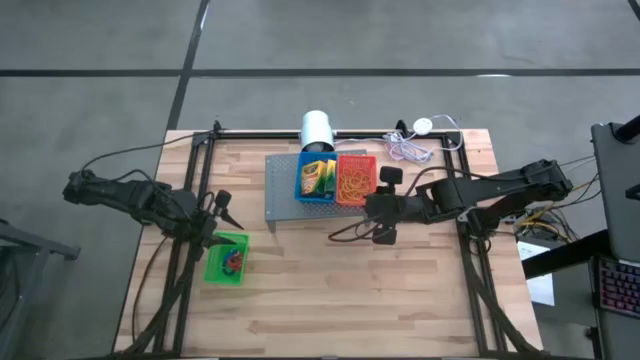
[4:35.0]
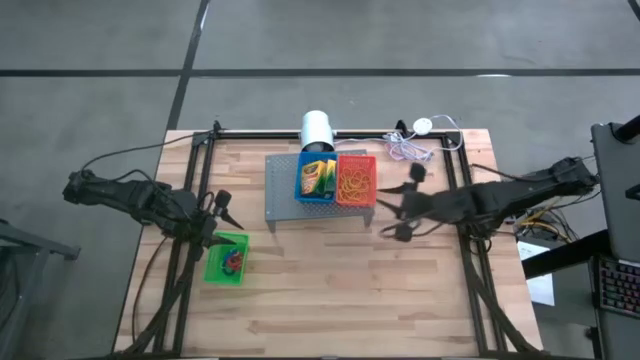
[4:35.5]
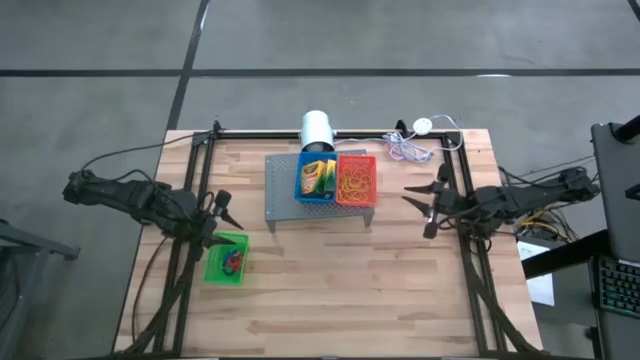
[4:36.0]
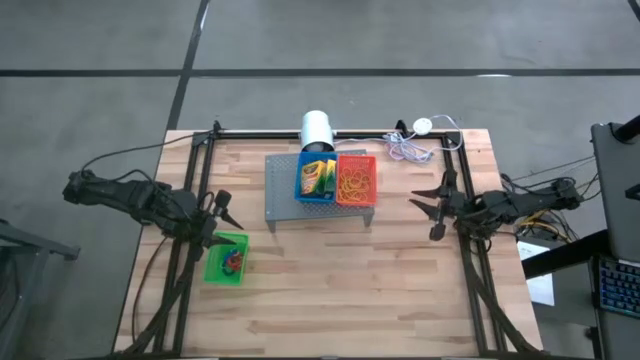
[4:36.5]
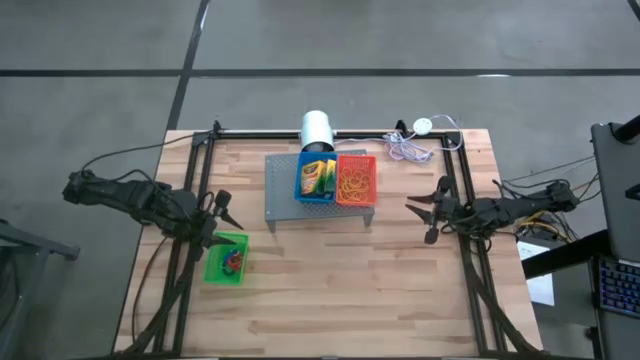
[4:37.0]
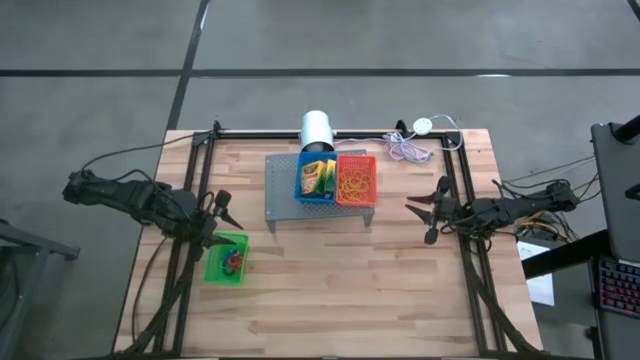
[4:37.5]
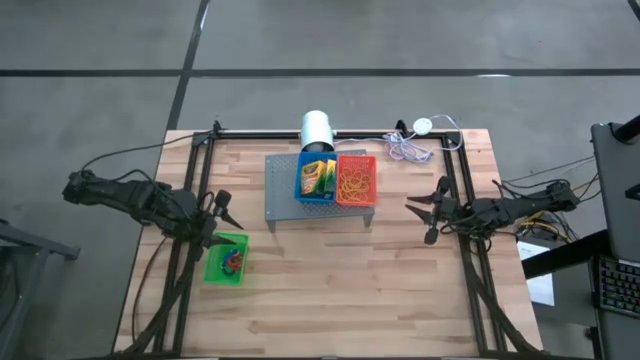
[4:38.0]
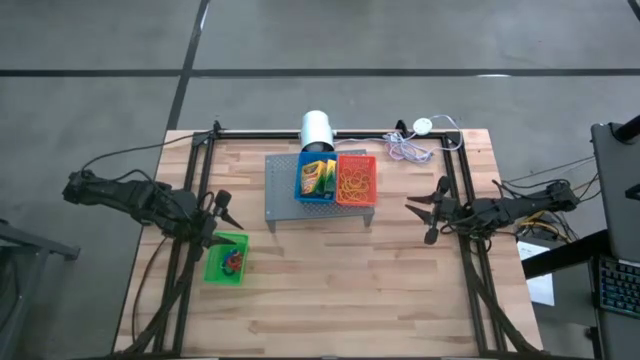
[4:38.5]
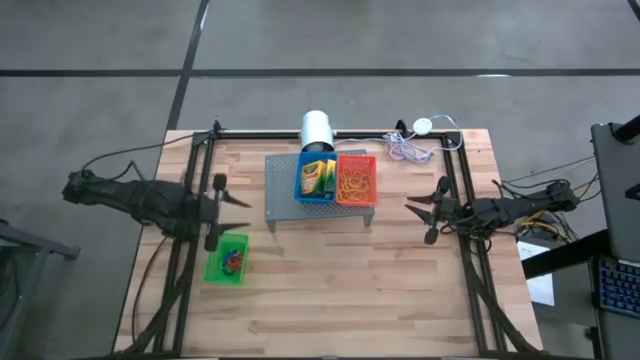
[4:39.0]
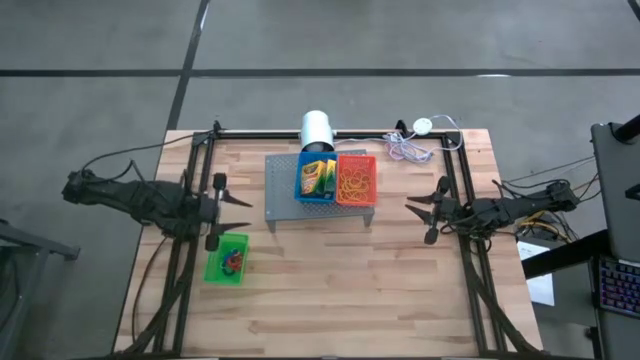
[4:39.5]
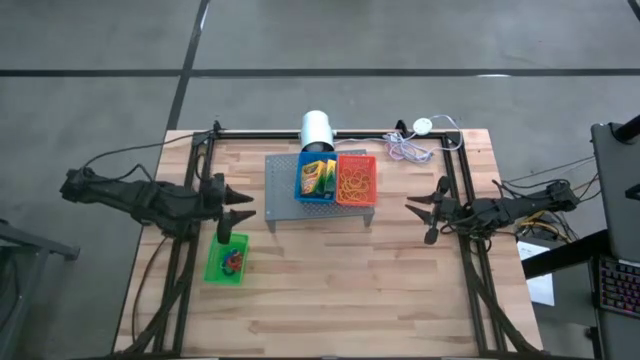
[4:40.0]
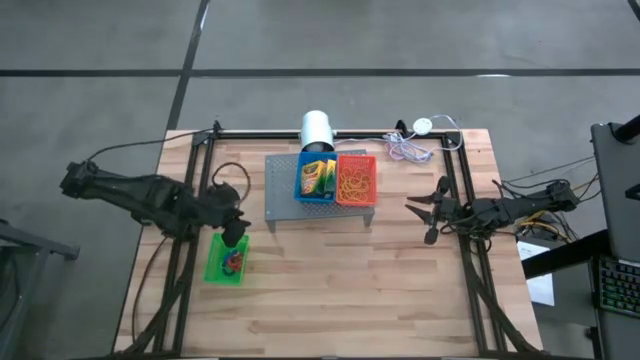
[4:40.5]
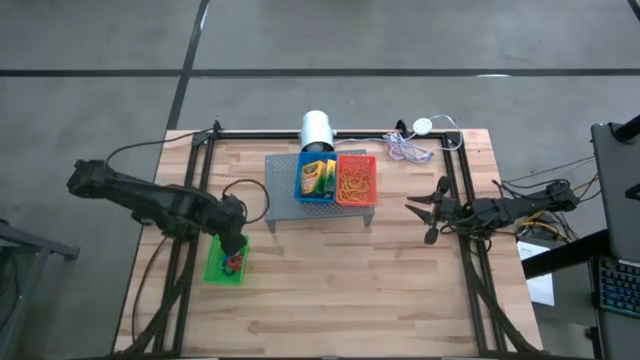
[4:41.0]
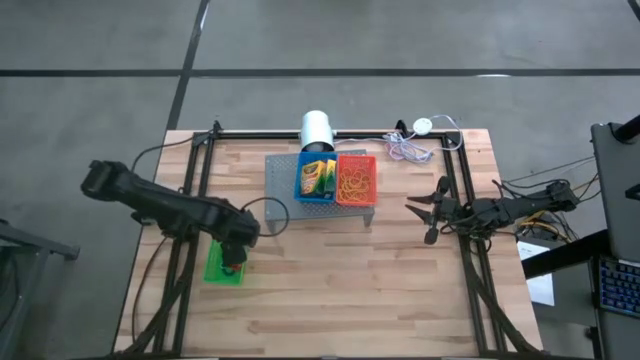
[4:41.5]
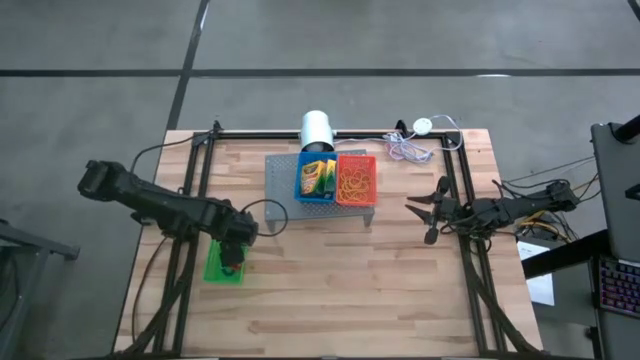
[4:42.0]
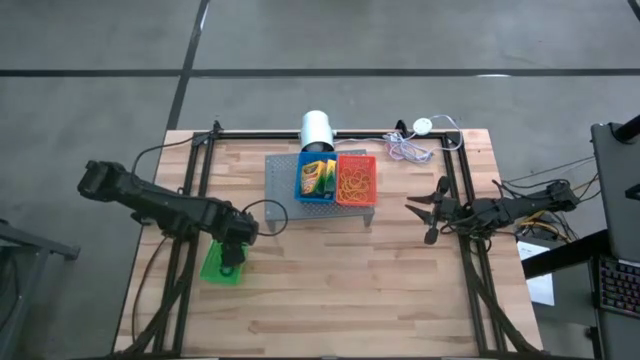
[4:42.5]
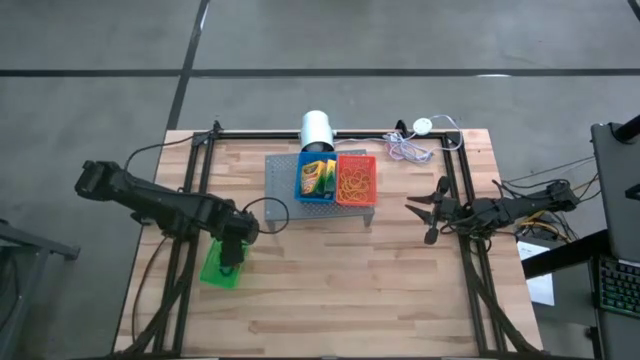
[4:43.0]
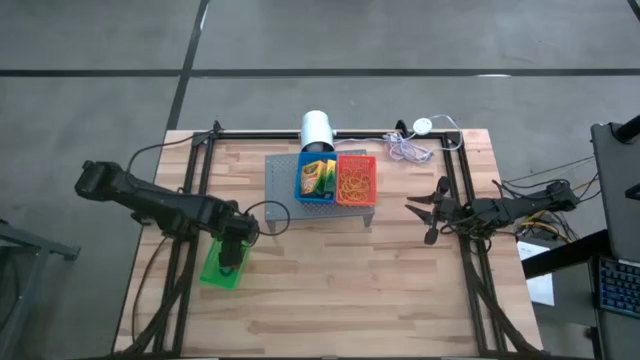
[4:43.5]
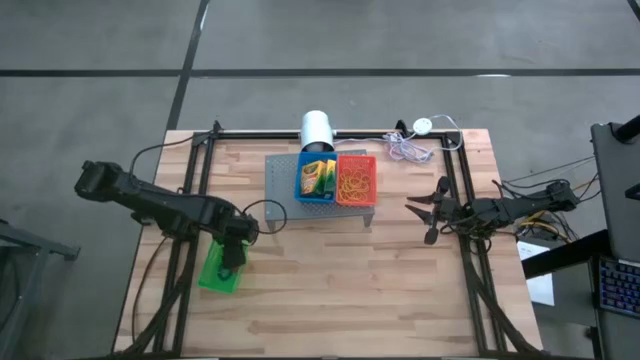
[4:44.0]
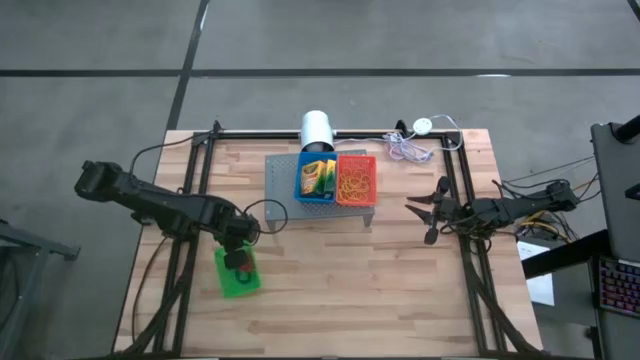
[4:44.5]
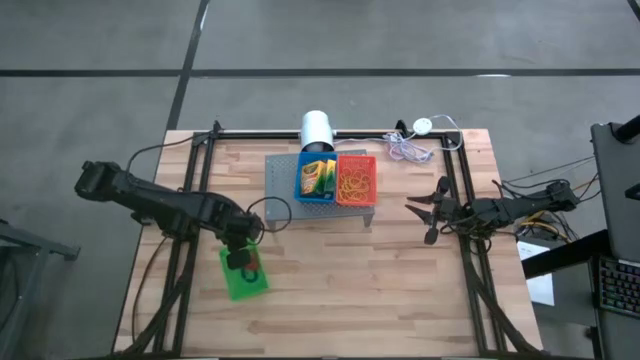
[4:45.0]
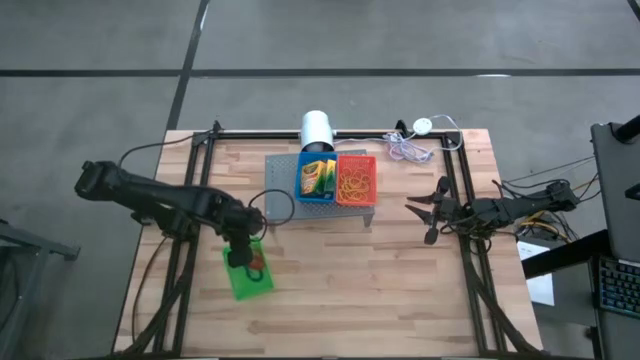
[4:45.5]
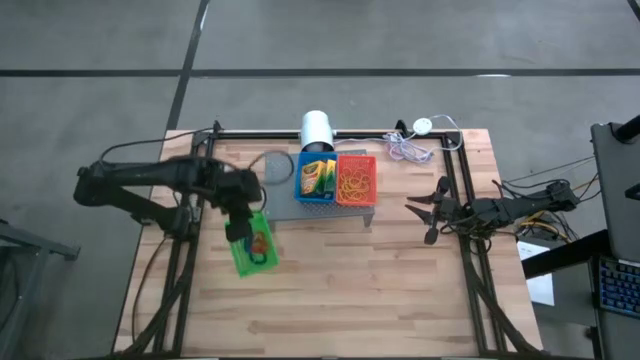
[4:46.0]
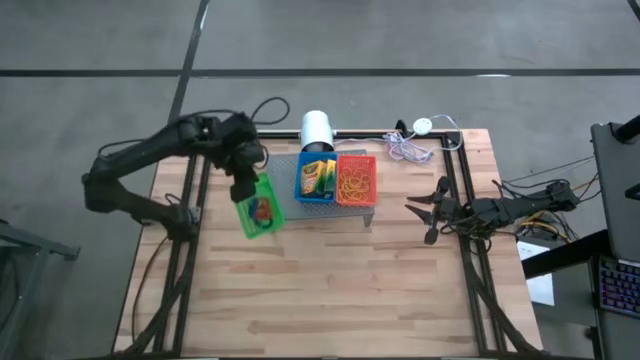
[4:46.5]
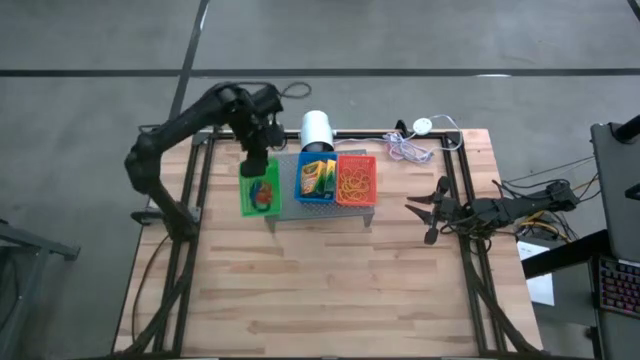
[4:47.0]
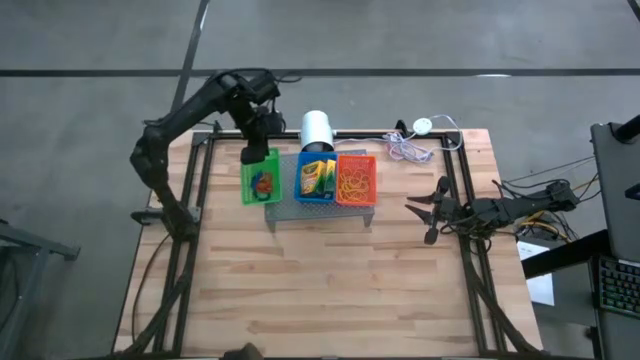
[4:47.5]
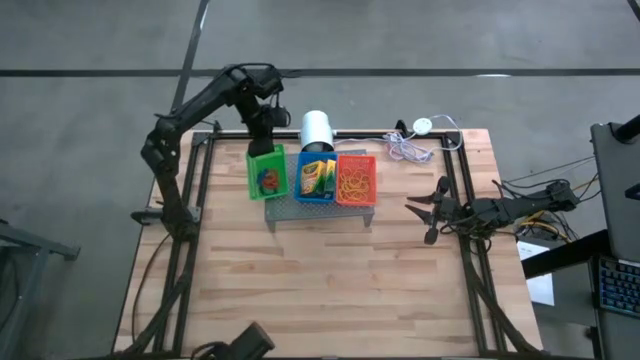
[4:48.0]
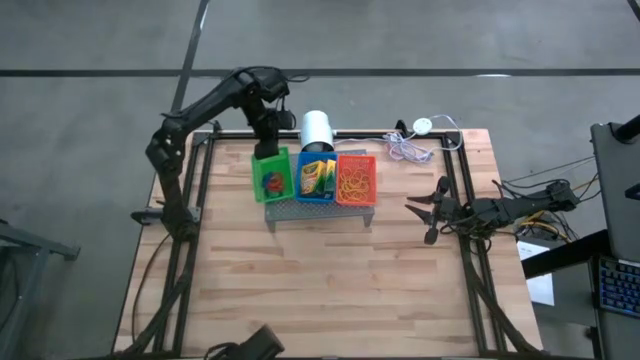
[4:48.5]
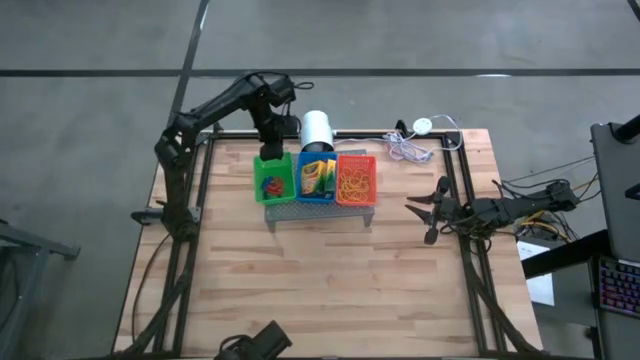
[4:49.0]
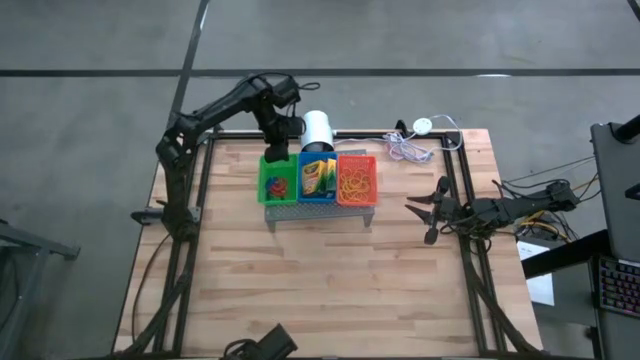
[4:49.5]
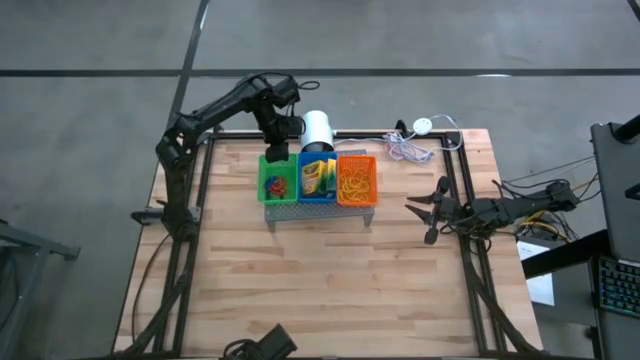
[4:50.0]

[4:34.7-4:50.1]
Task: Pick & Place Office Desk Supplies
Put the colored spring keychains into the green bin on the shelf

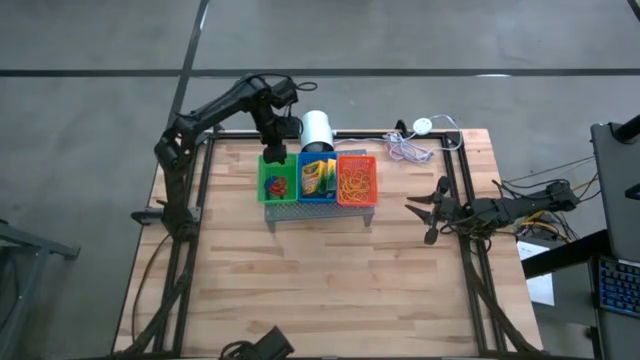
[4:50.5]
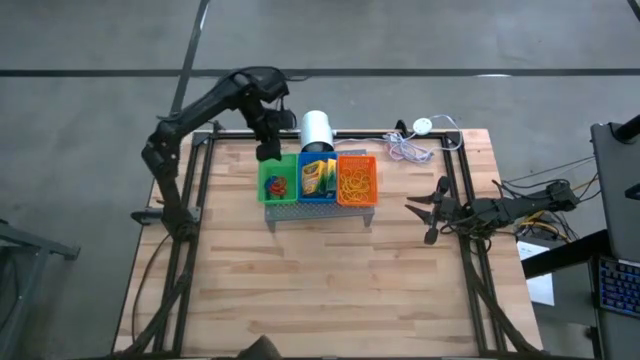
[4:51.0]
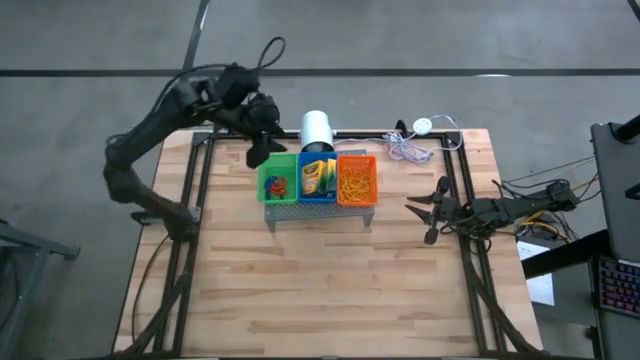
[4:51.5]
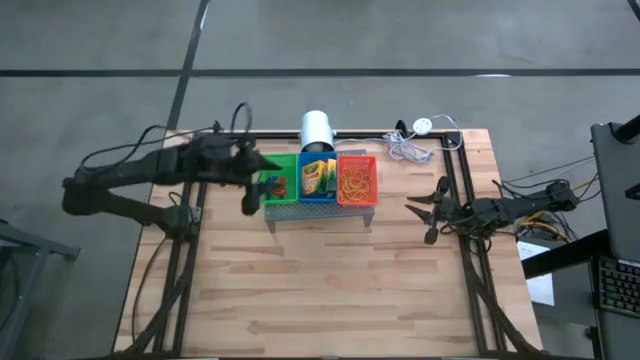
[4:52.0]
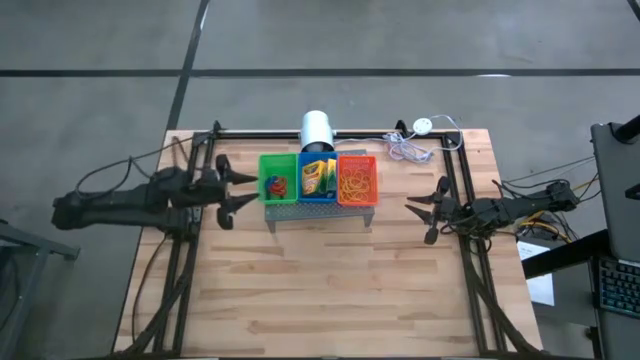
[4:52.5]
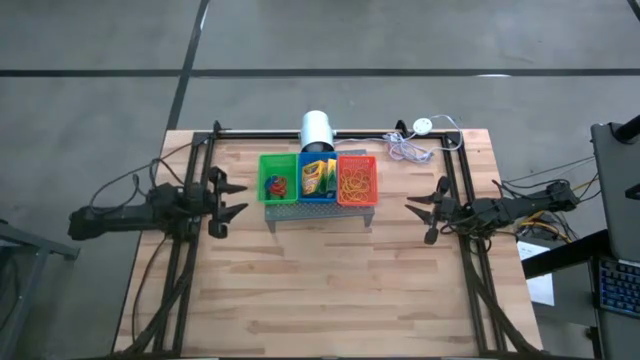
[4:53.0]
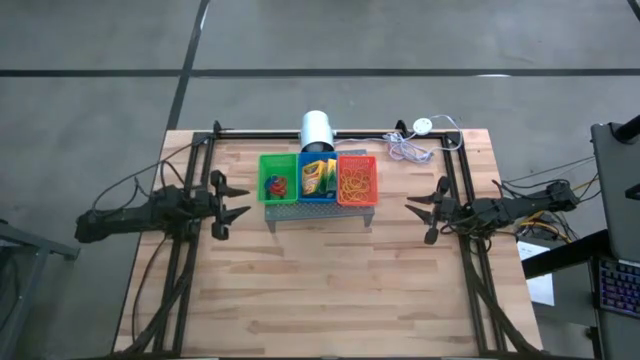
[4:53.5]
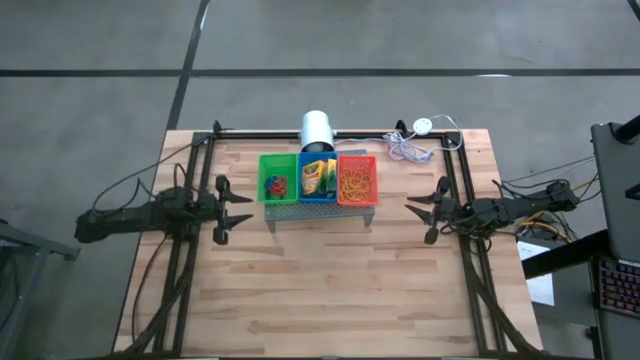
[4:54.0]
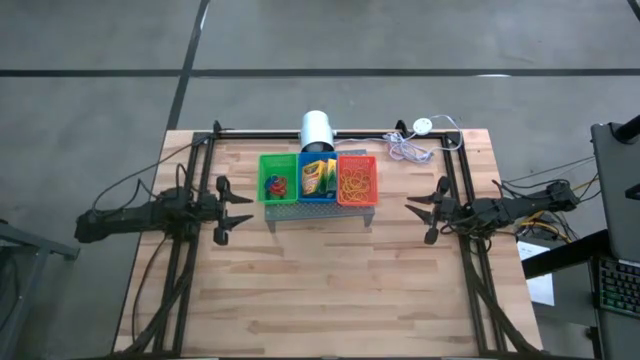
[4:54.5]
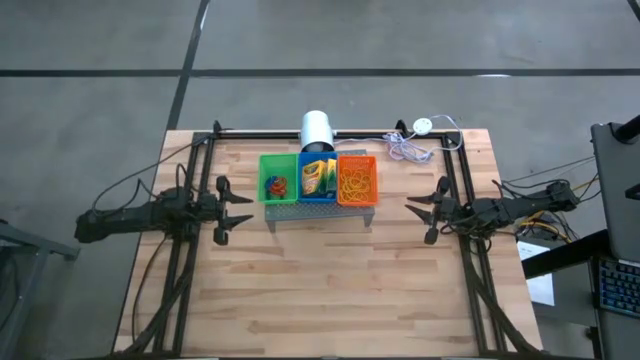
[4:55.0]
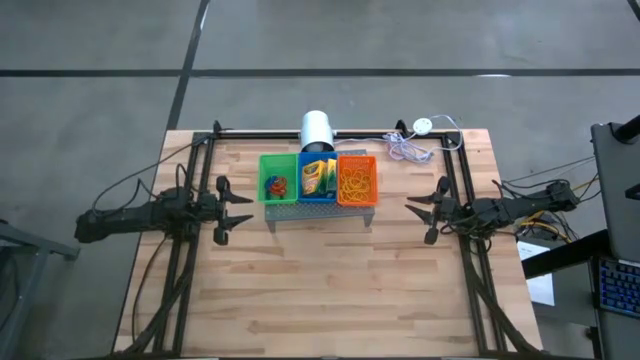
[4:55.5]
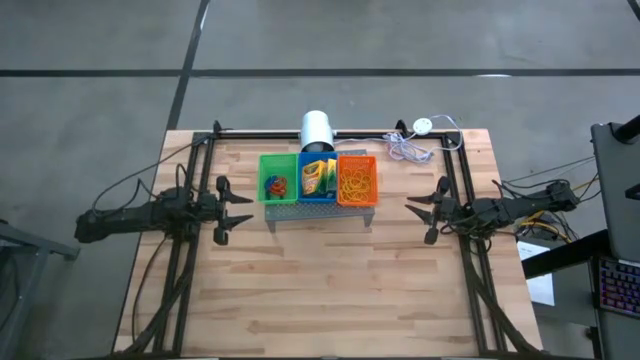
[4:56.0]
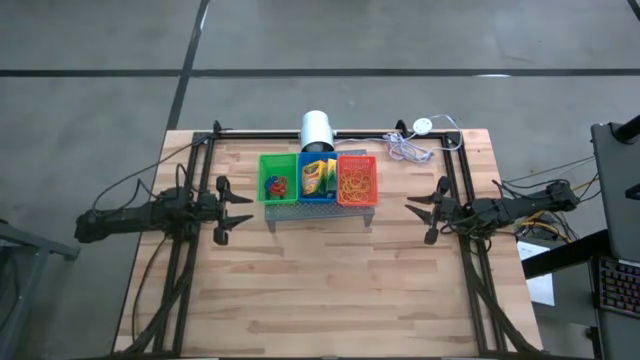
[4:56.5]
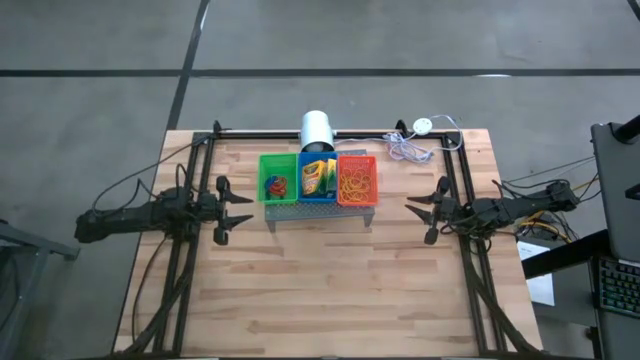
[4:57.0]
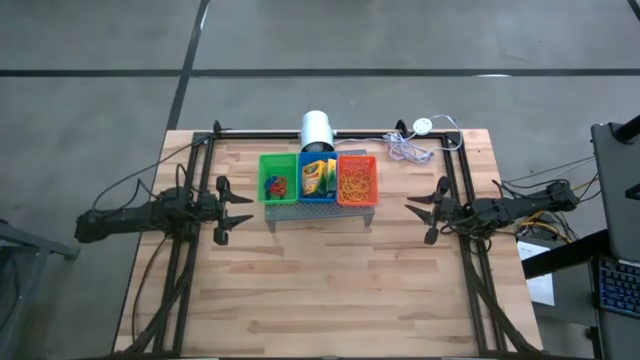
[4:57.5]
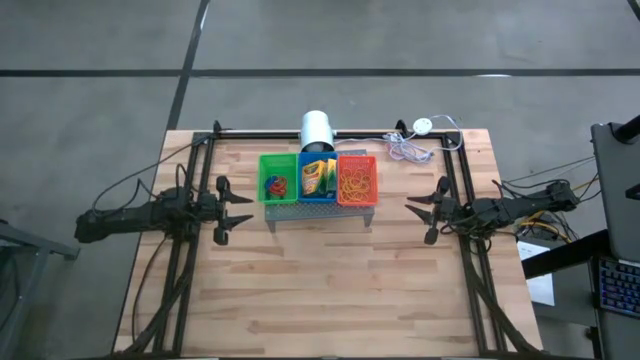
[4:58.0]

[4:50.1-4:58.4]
Return to Home Position
